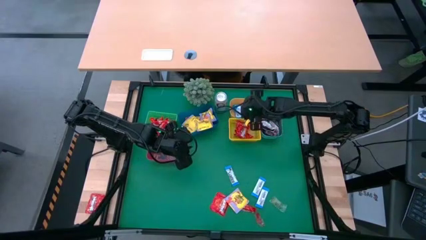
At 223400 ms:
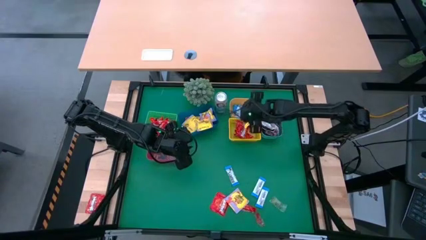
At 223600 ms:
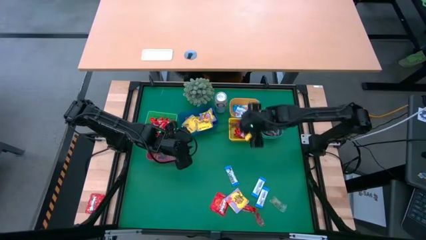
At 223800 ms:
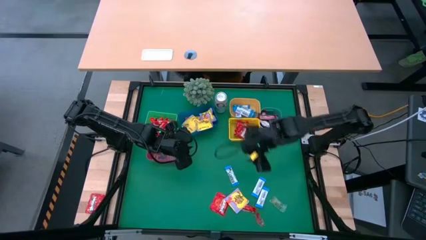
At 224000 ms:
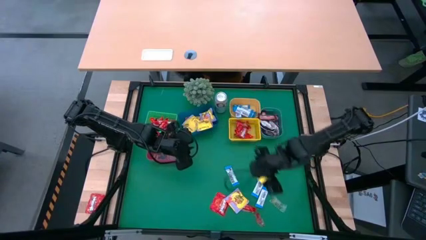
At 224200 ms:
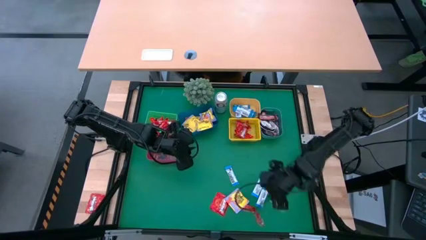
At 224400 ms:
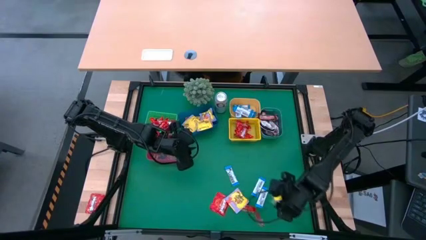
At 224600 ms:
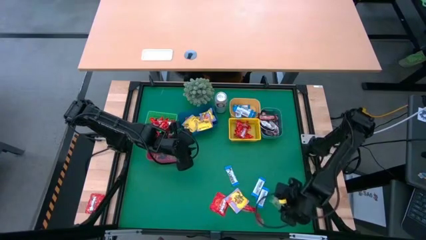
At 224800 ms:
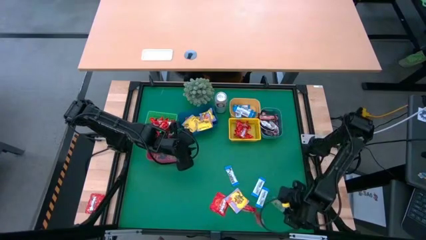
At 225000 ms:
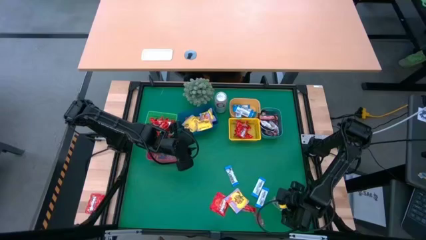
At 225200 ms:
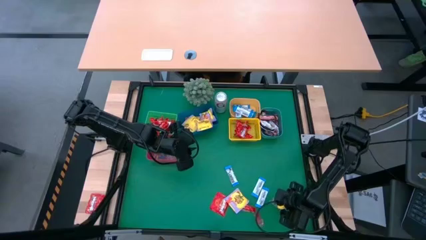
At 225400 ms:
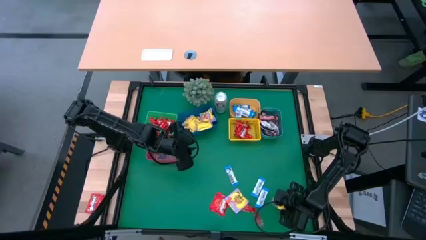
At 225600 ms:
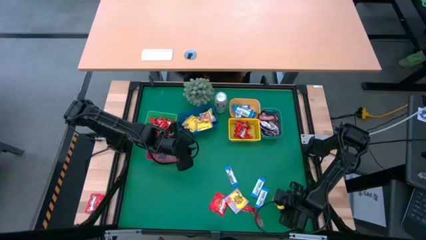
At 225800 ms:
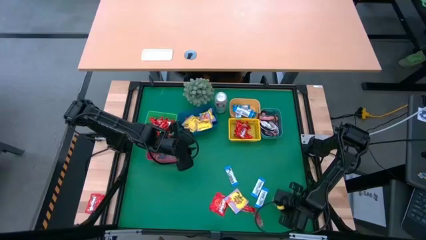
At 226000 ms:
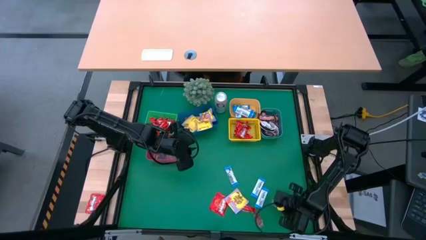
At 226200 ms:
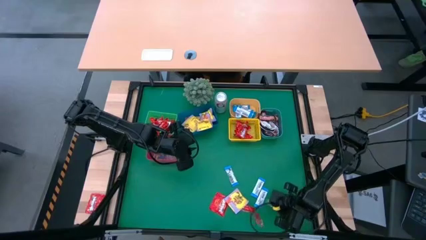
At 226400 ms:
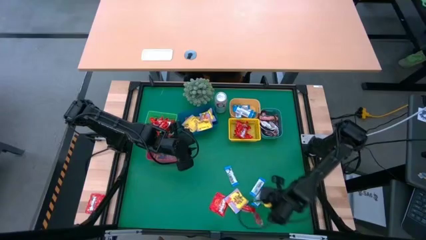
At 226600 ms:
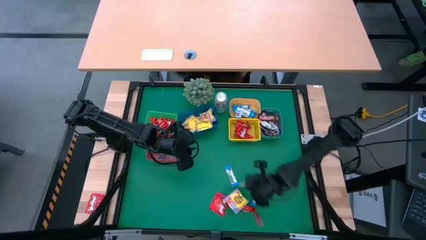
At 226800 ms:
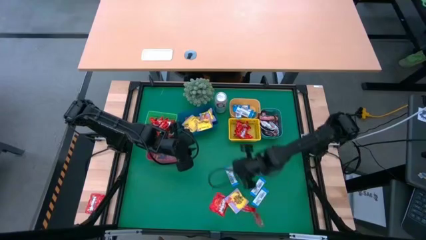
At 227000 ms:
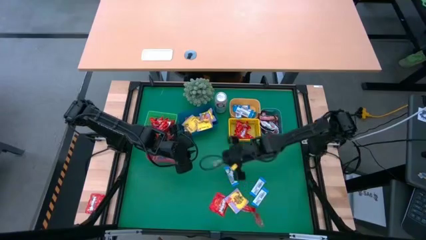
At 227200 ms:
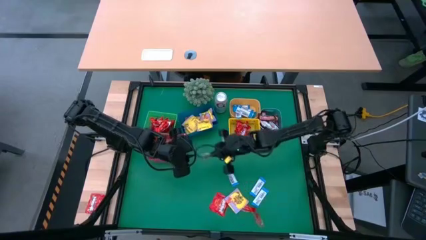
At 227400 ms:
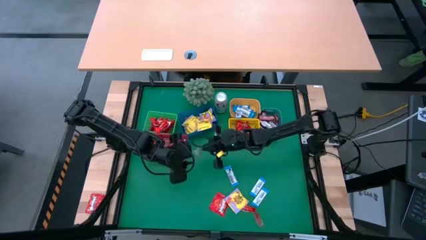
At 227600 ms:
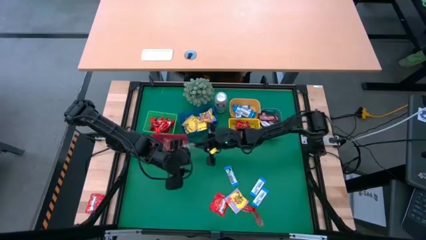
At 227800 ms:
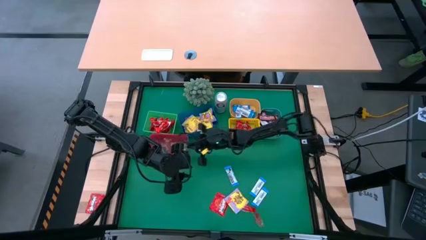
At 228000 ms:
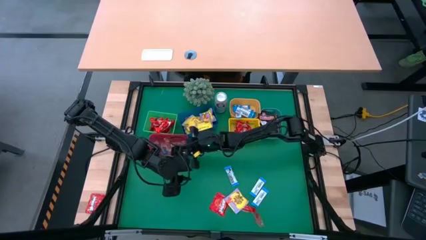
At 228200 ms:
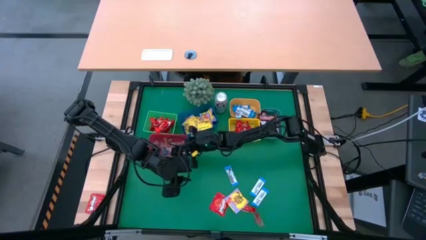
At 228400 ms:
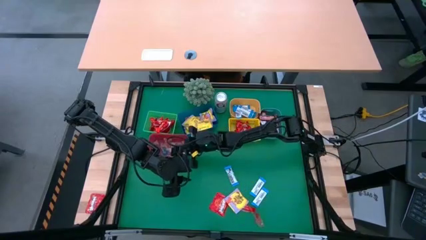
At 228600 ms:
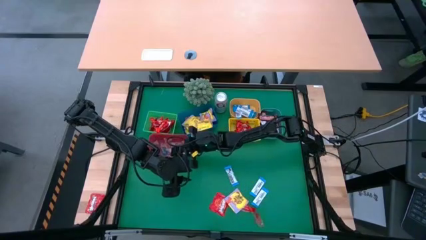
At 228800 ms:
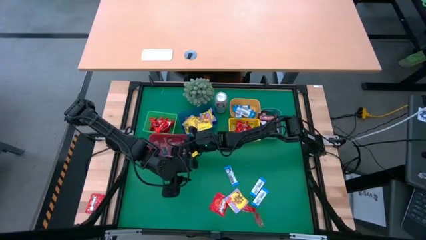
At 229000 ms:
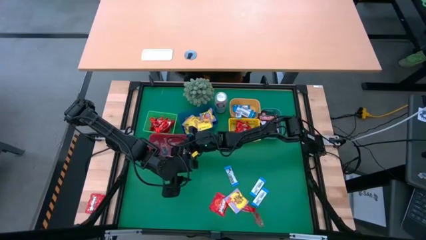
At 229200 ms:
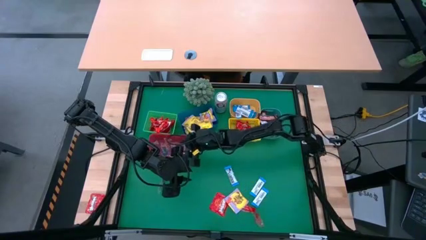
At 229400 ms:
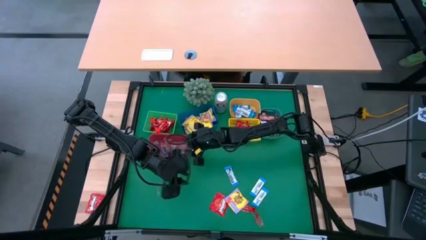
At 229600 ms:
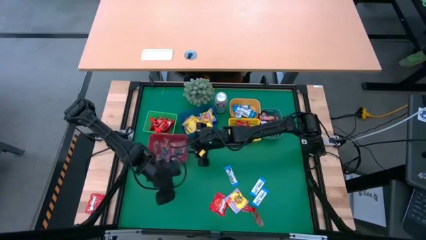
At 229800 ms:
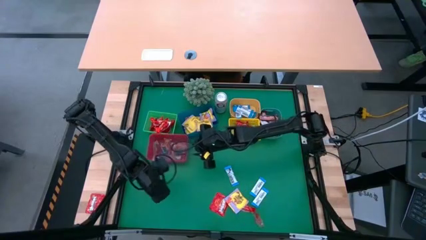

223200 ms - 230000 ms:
Task: Sort candy
Put the transparent green candy pack into the red bin

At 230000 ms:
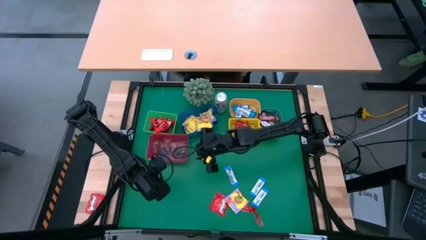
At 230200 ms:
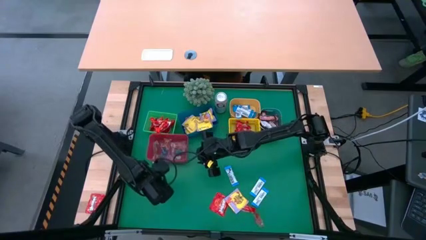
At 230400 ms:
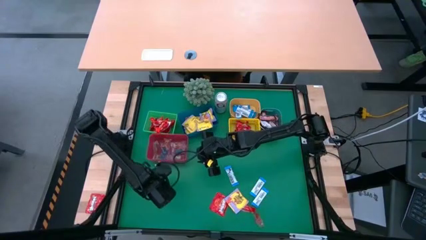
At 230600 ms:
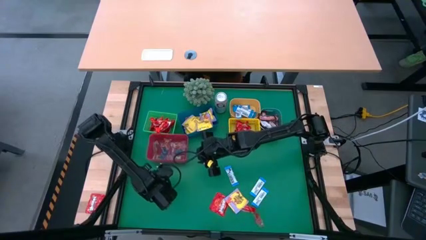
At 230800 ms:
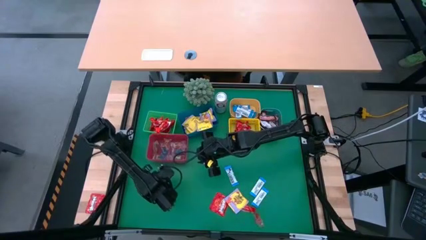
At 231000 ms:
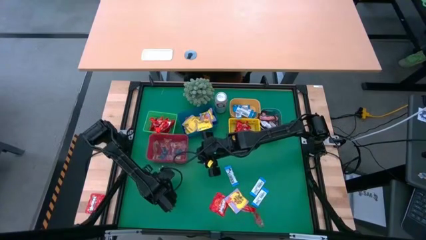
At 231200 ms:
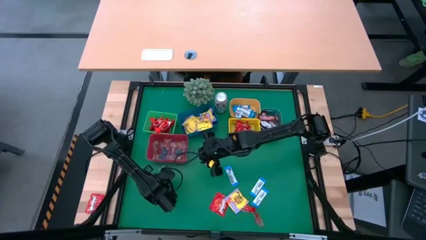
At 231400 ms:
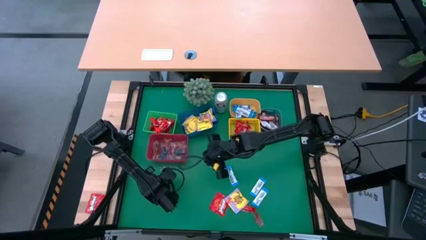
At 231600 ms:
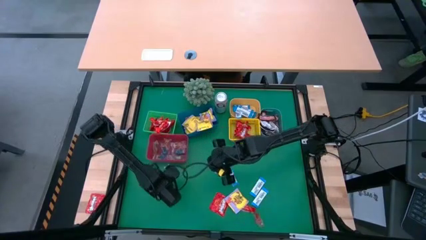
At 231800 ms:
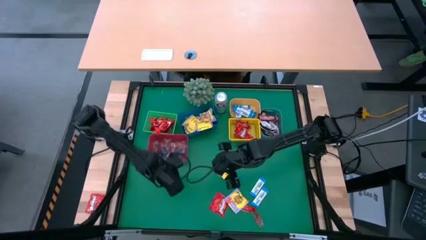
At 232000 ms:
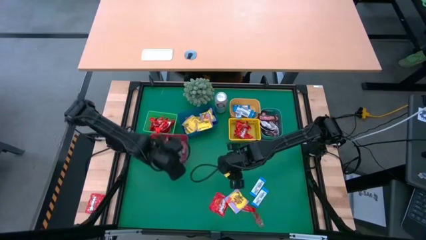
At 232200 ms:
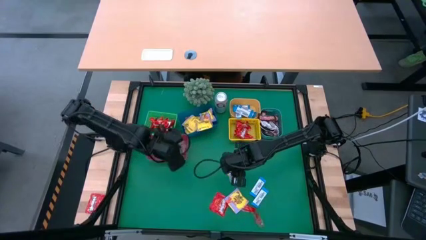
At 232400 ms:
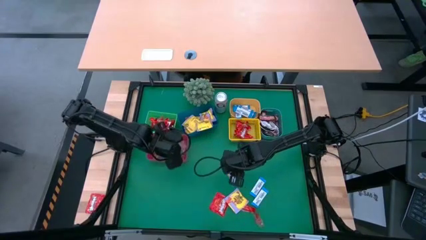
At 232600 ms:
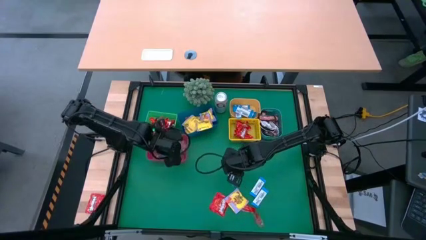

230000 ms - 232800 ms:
Put the transparent green candy pack into the red bin

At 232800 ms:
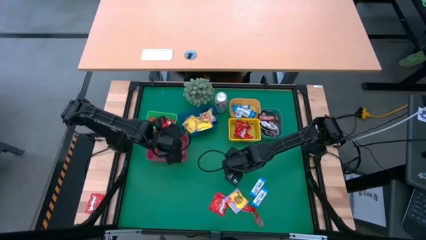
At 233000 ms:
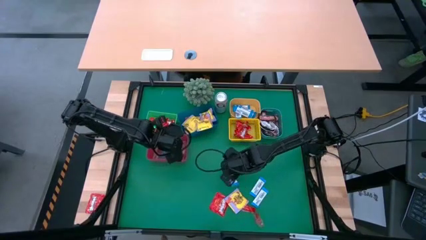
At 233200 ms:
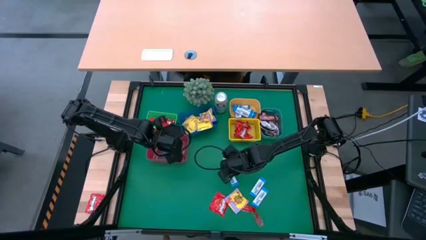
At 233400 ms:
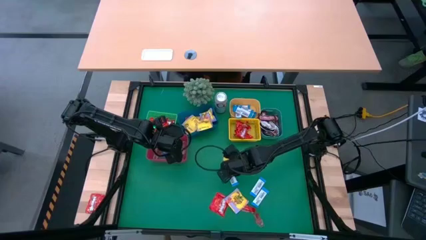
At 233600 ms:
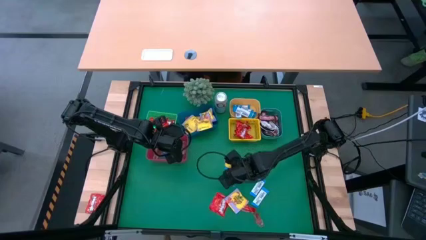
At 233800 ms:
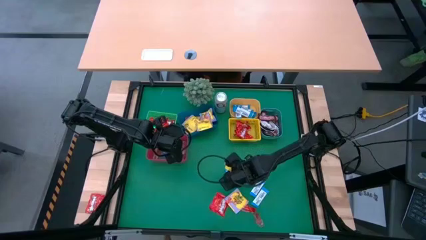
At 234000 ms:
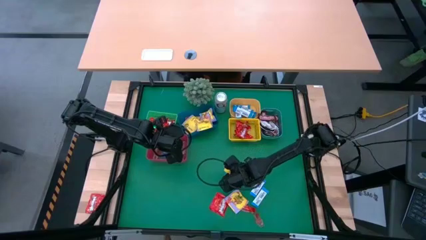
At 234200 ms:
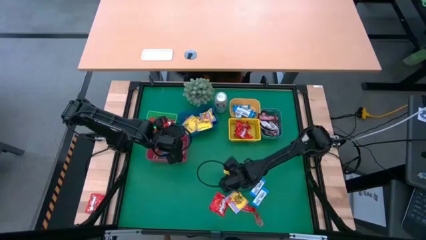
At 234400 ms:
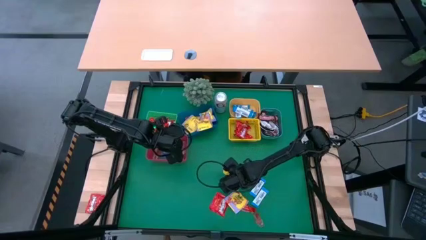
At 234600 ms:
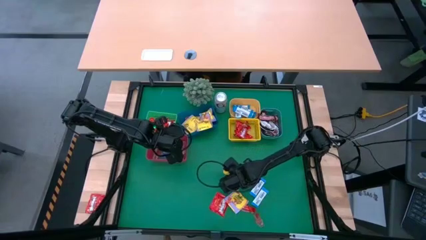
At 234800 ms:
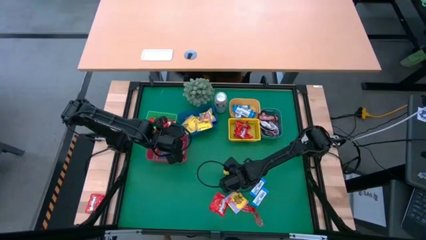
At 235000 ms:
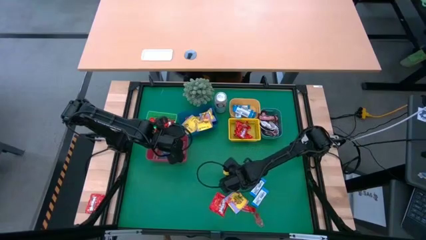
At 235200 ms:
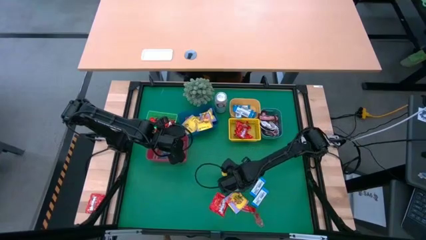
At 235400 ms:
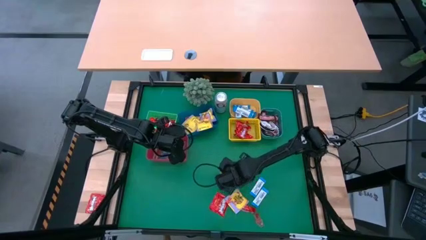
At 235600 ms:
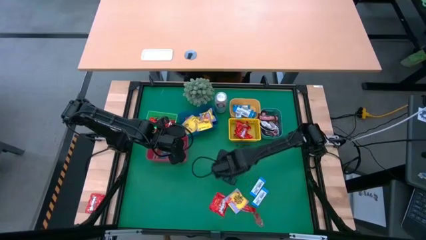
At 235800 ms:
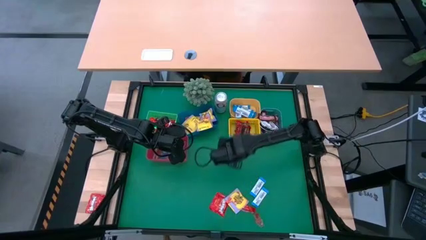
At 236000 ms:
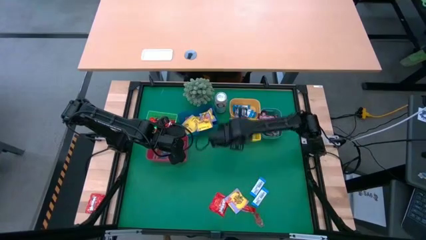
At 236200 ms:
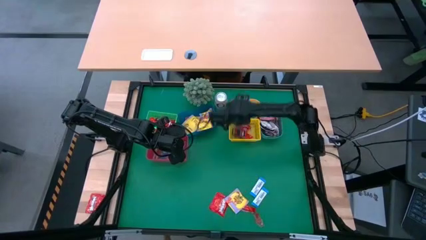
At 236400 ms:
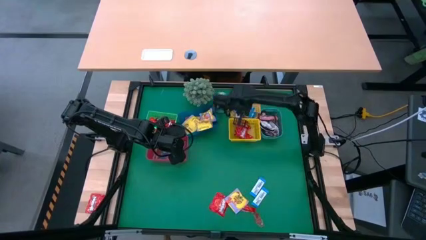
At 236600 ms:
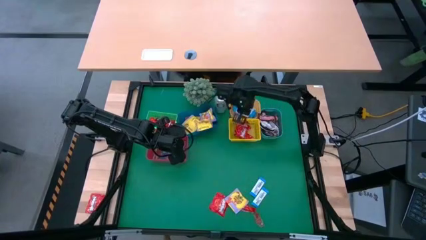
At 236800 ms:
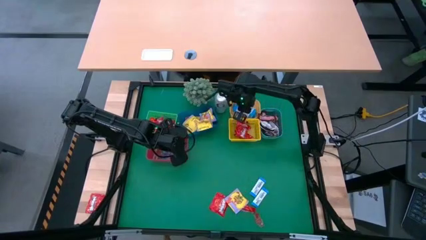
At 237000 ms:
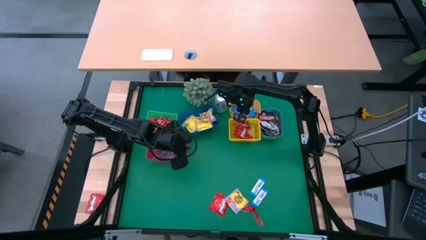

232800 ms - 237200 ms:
Put the blue chocolate bar into the orange bin

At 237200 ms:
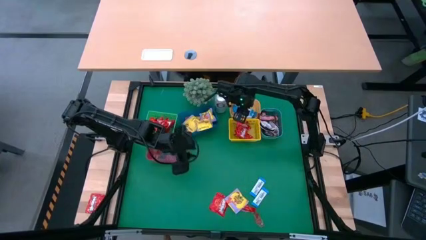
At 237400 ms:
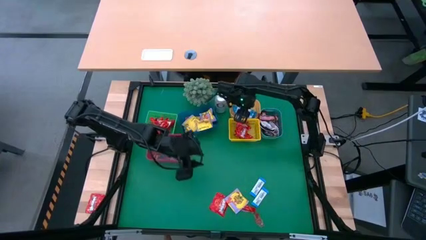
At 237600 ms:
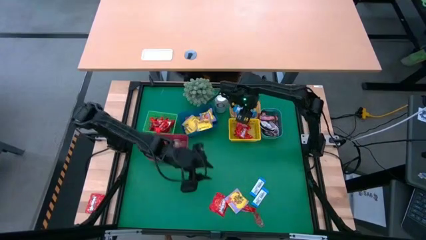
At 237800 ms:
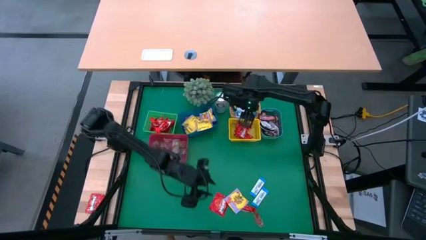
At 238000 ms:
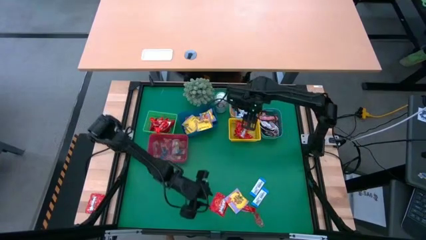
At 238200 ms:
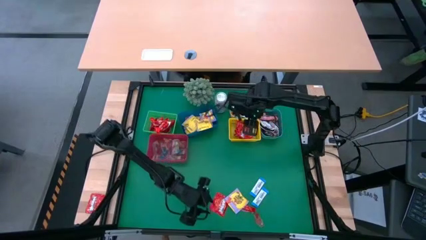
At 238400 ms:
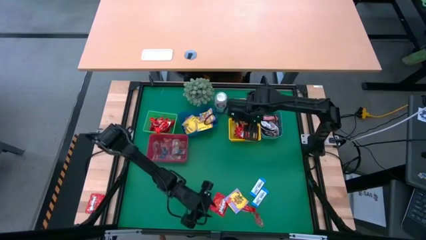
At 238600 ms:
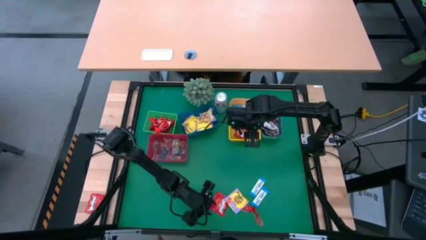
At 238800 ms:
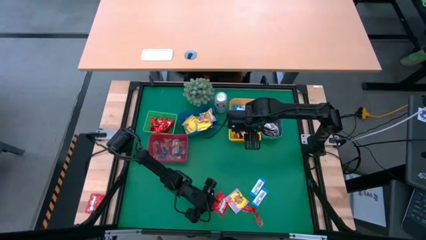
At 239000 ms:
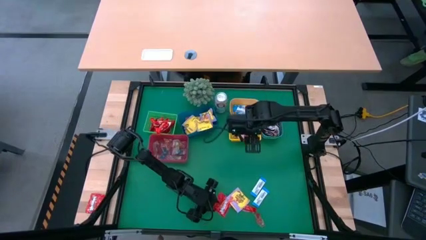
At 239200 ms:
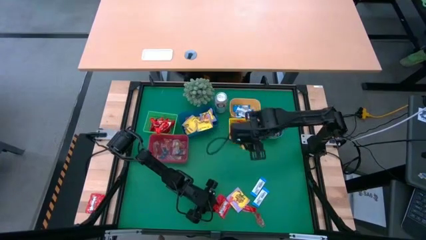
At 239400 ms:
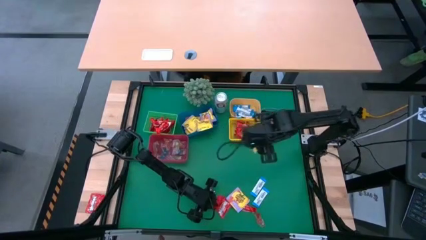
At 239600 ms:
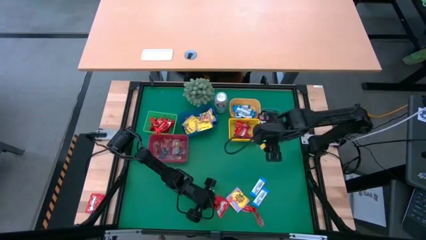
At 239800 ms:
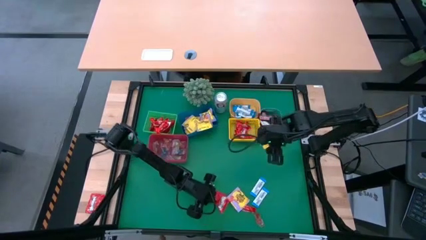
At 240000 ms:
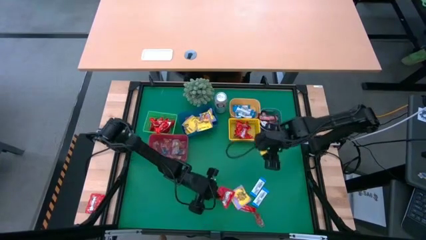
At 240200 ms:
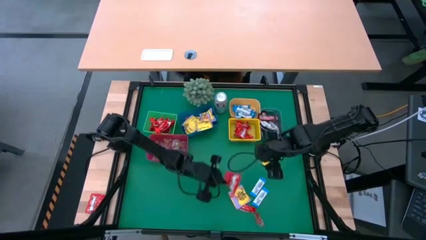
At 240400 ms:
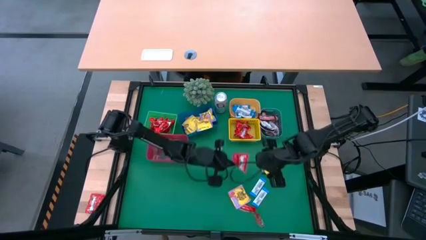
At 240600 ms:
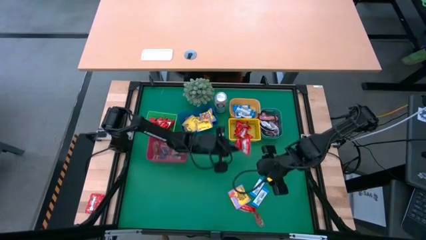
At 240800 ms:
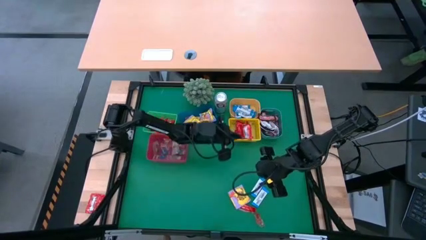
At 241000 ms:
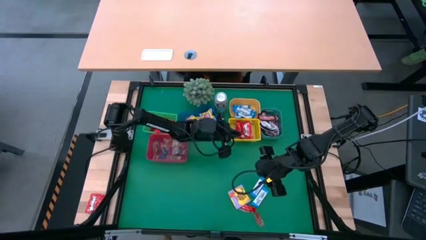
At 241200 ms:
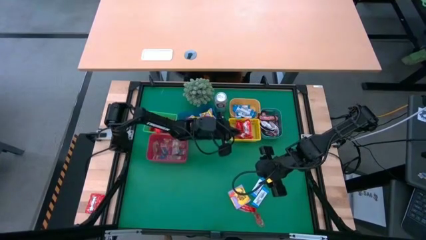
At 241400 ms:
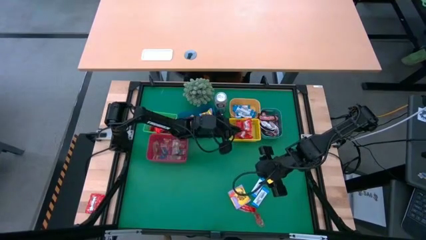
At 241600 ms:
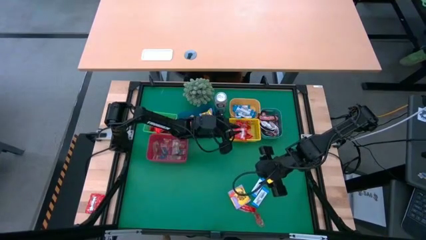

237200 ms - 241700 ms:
Put the red candy pack into the yellow bin
